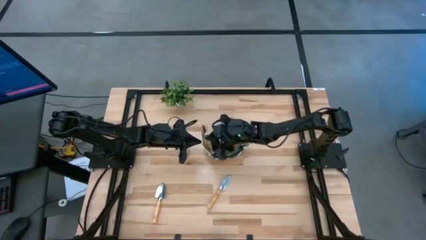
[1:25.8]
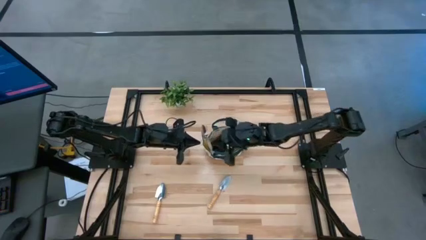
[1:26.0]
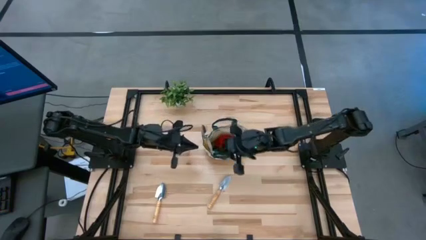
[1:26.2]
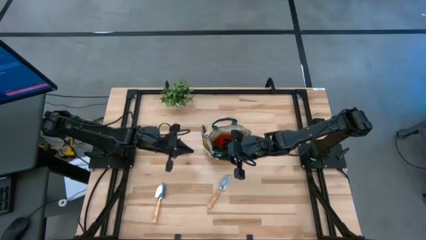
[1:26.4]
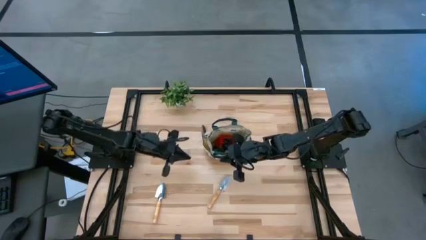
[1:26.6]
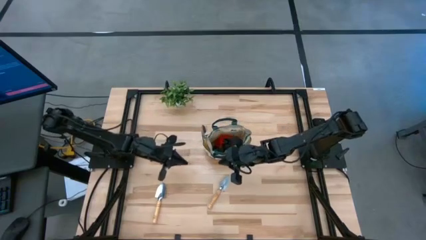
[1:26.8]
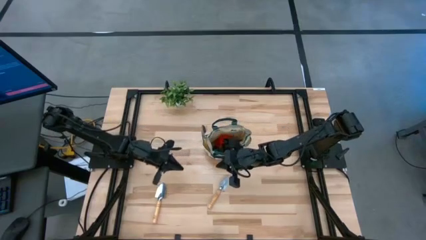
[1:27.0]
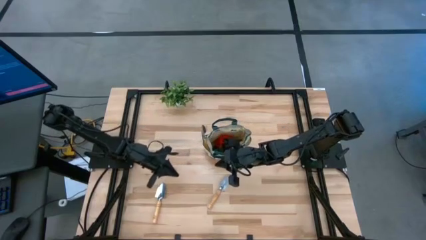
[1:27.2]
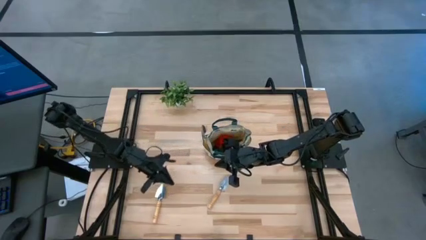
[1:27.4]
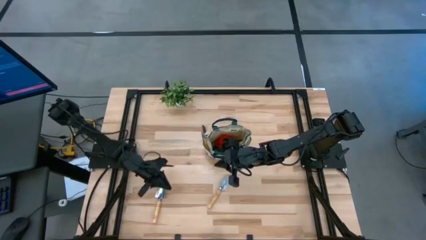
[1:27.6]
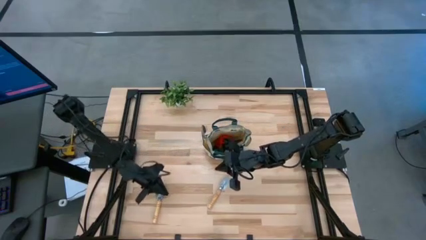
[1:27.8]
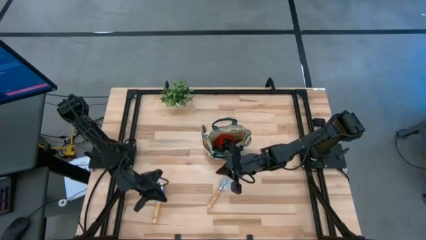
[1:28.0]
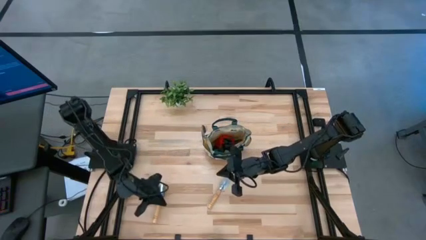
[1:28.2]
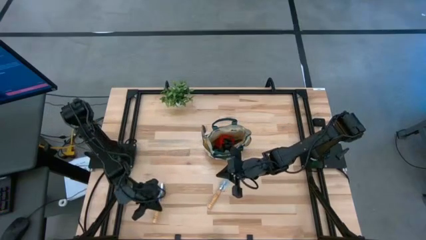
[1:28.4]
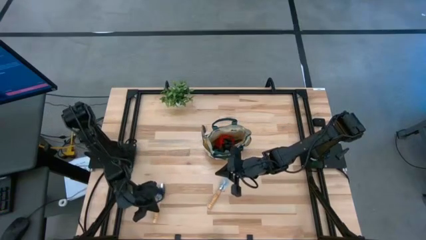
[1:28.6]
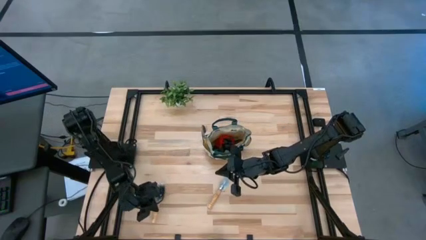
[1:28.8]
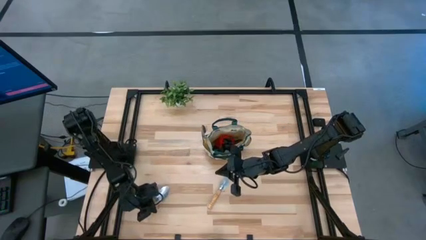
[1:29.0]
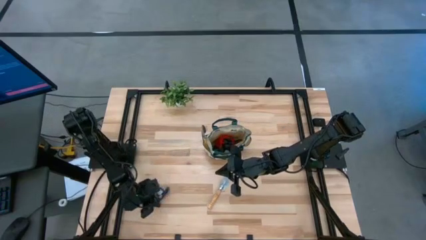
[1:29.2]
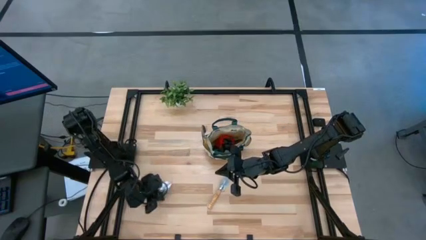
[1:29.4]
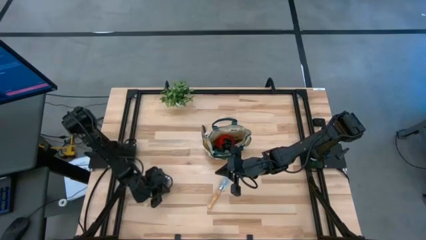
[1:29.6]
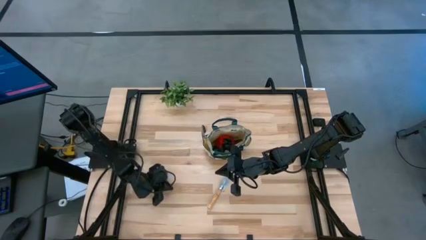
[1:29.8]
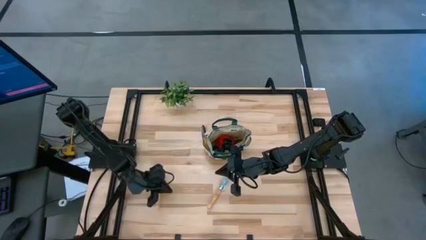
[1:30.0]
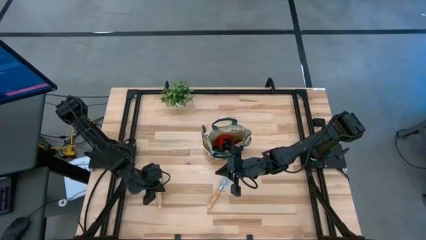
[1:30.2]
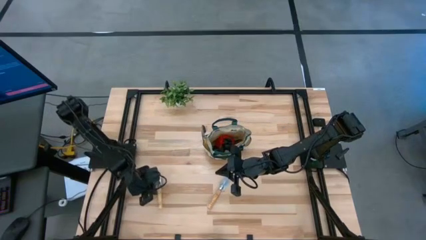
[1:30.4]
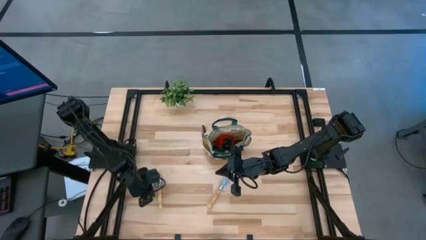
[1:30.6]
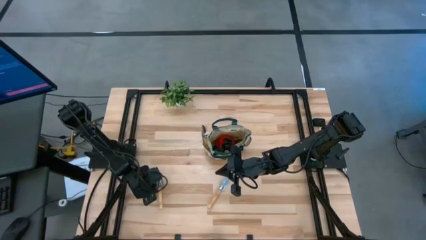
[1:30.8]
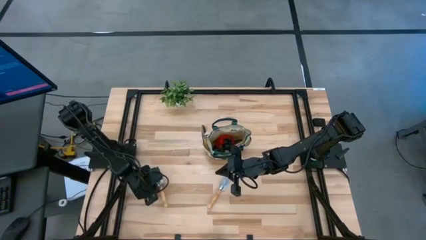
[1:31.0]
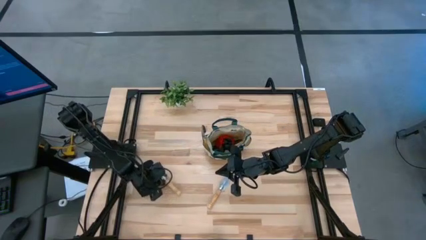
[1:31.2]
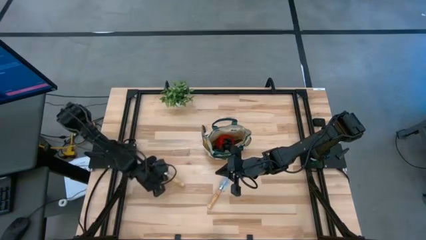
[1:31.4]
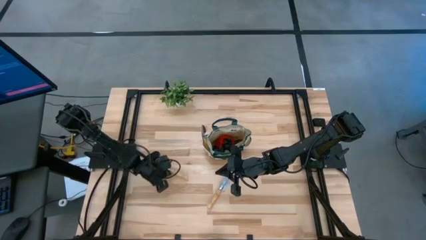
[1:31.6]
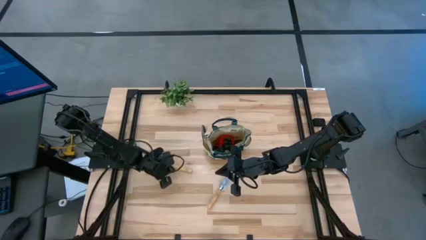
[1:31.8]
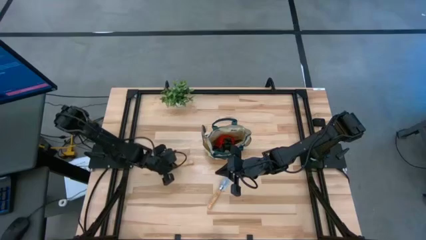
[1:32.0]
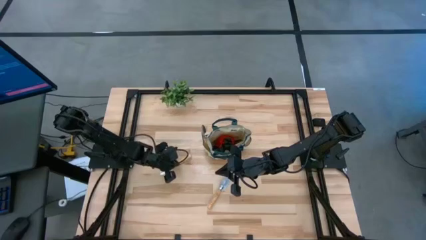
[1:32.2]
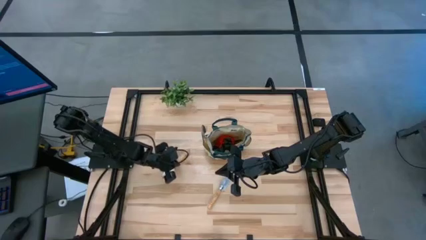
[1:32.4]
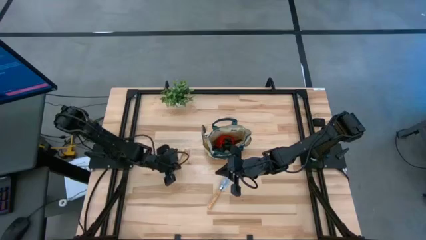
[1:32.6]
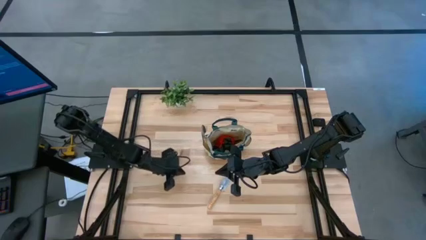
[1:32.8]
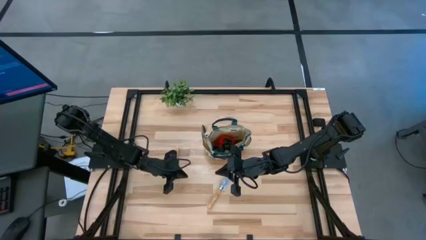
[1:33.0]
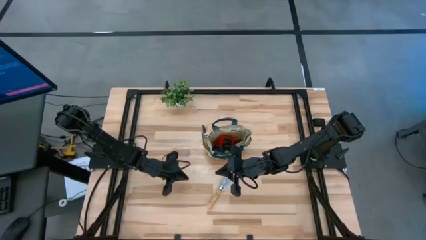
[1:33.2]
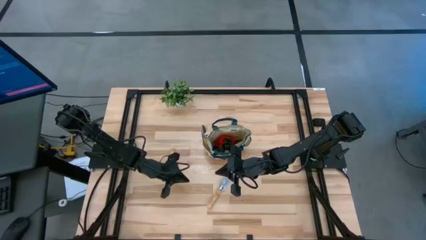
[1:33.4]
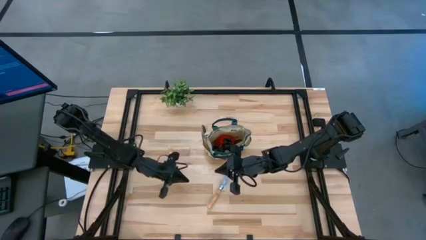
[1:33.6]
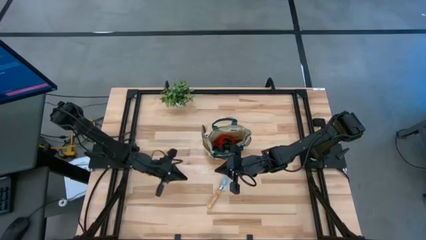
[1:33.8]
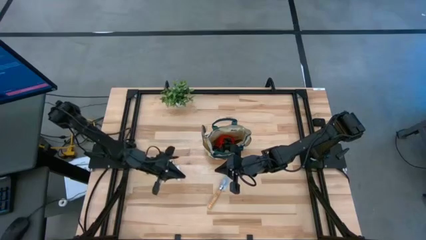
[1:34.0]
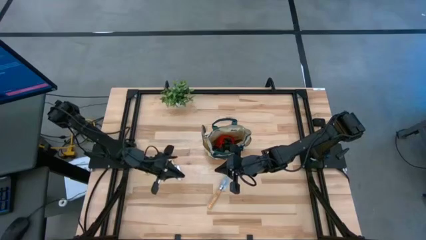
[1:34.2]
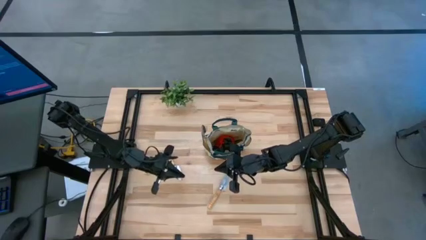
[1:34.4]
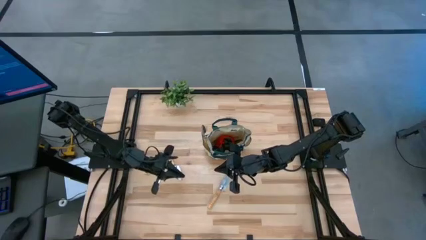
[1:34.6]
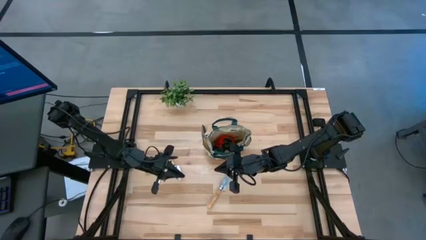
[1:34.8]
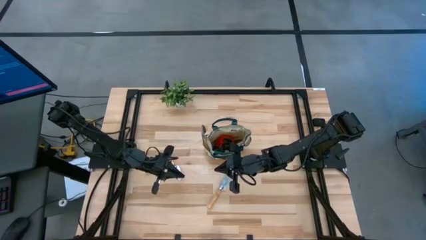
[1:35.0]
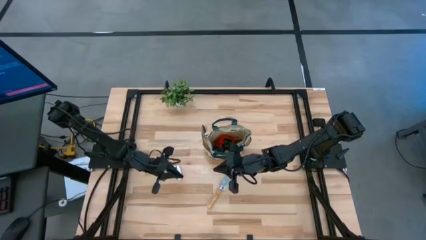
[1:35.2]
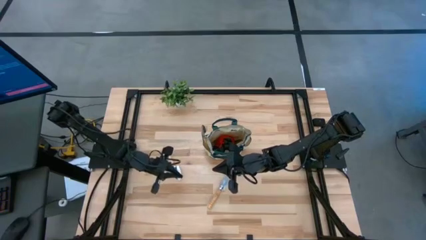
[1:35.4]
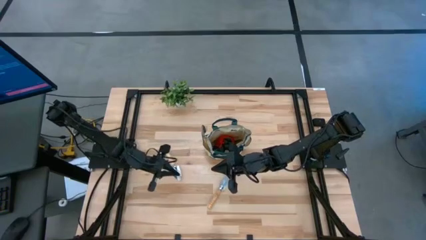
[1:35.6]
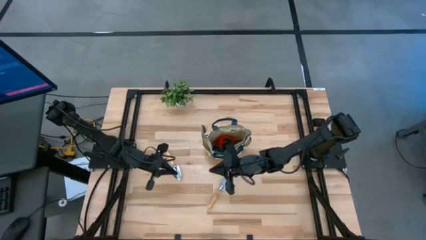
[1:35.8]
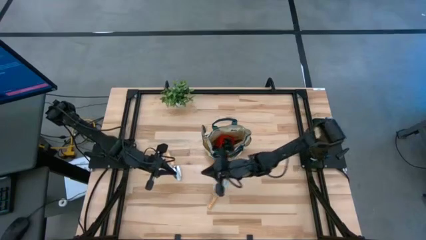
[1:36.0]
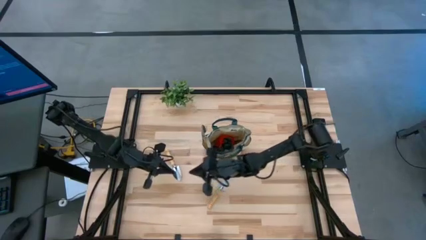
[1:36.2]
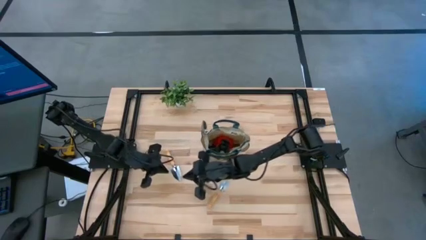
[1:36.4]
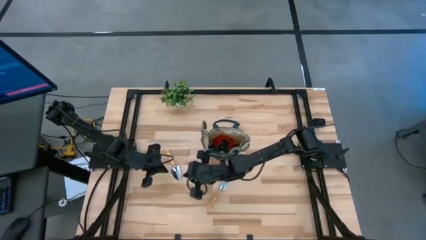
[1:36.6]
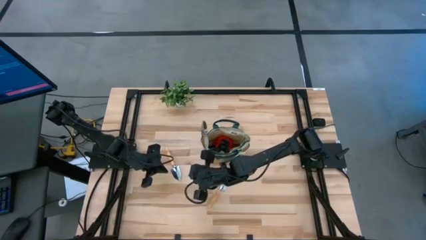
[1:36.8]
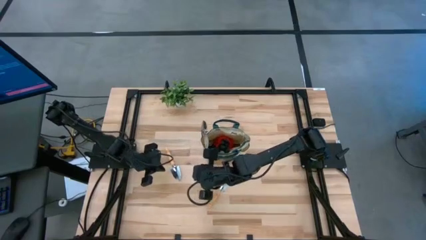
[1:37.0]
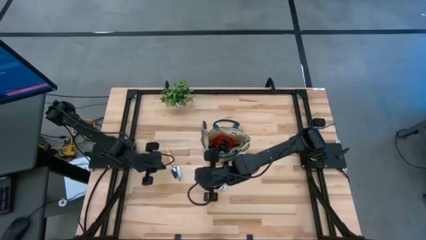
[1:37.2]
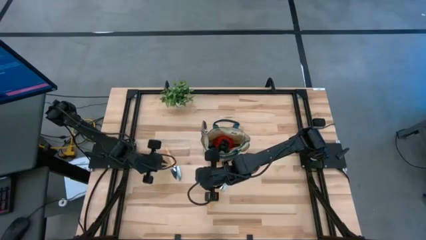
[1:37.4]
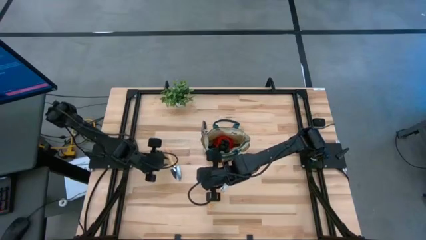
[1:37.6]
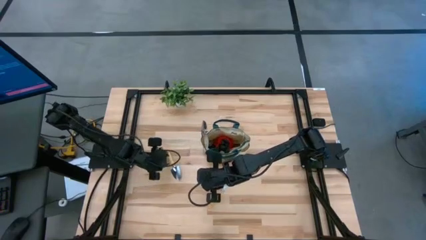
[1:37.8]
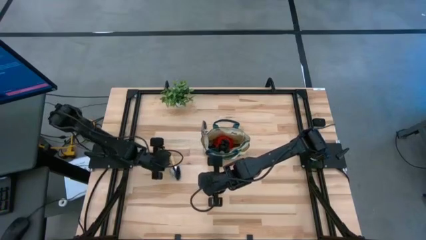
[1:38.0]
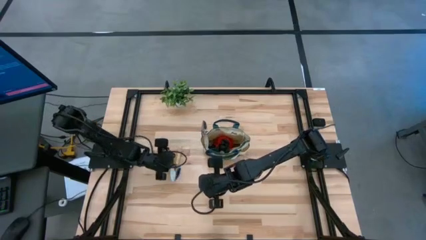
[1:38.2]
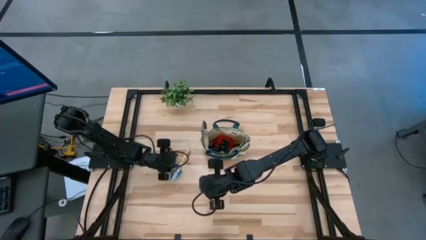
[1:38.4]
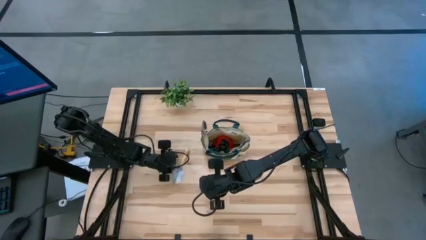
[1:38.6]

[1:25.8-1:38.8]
Task: Pick & Place Garden tools in Gardening bag
Put the trowel into the gardening bag

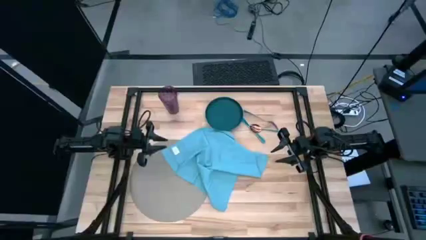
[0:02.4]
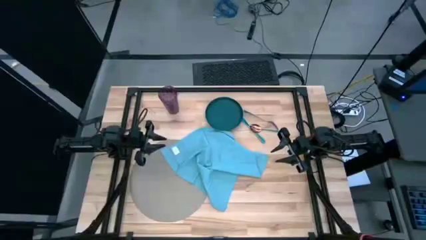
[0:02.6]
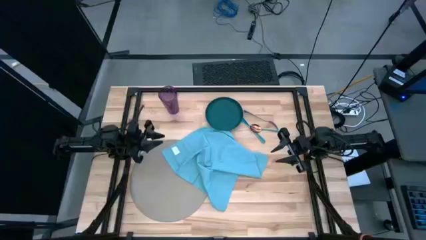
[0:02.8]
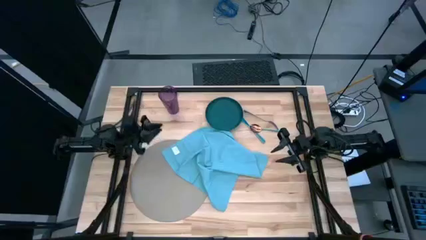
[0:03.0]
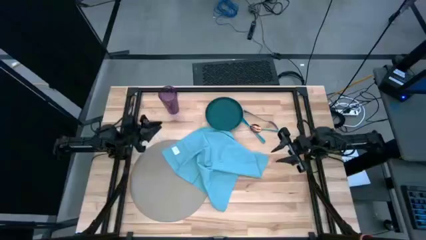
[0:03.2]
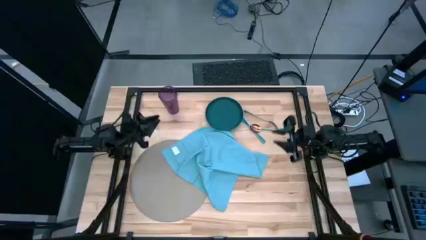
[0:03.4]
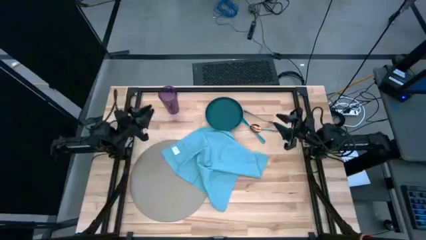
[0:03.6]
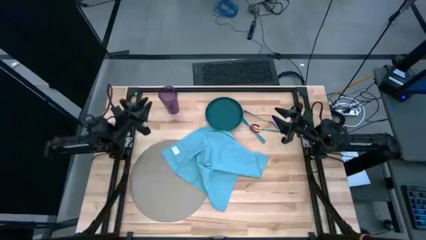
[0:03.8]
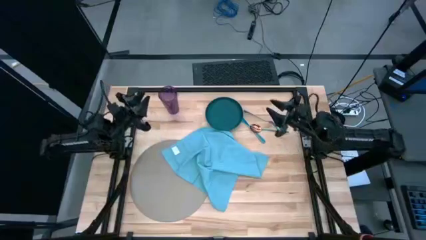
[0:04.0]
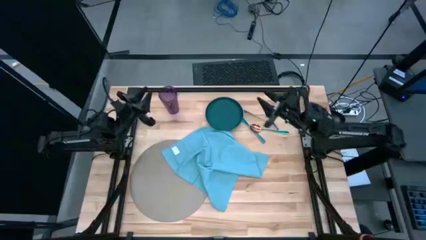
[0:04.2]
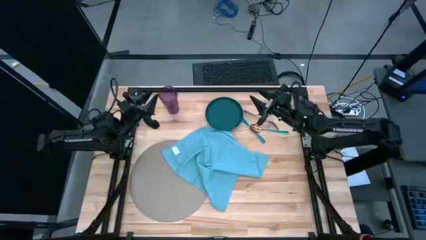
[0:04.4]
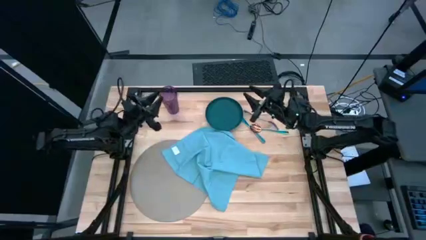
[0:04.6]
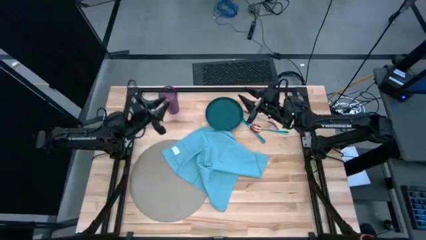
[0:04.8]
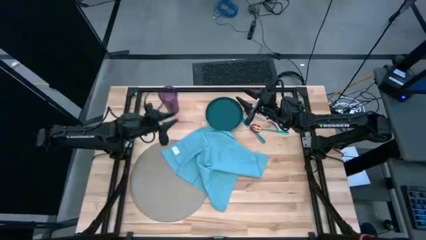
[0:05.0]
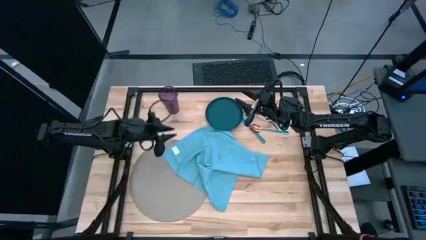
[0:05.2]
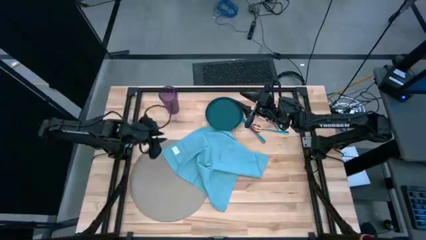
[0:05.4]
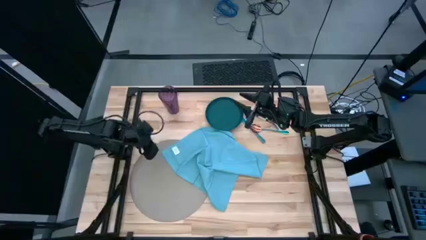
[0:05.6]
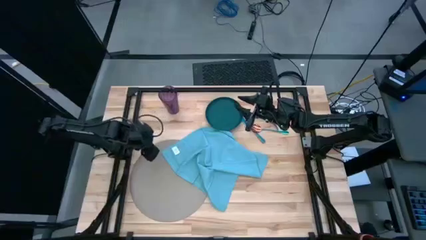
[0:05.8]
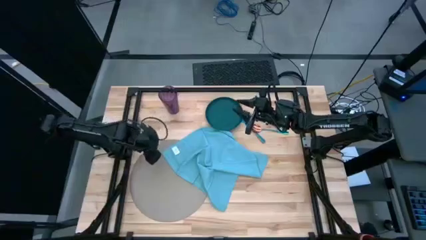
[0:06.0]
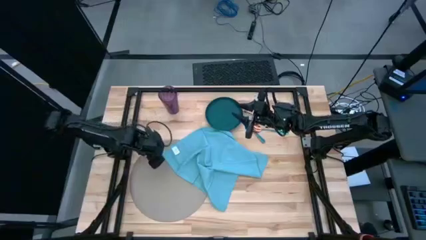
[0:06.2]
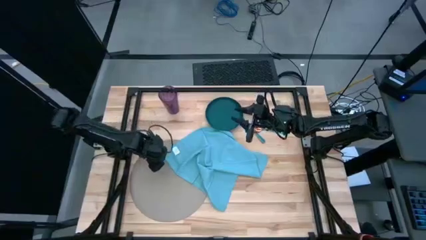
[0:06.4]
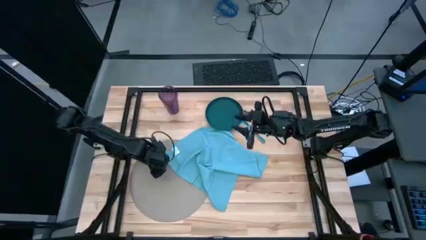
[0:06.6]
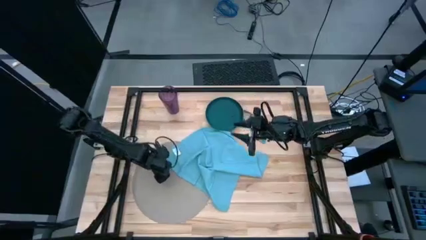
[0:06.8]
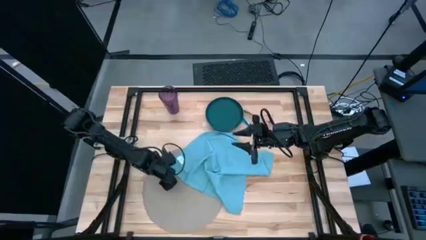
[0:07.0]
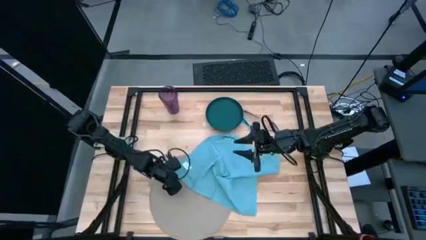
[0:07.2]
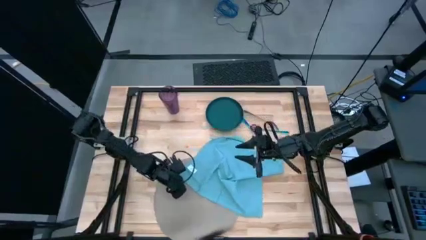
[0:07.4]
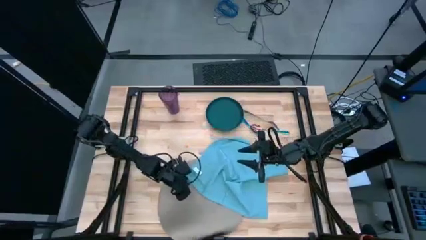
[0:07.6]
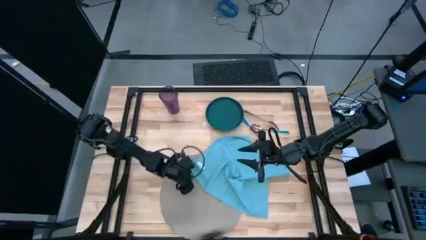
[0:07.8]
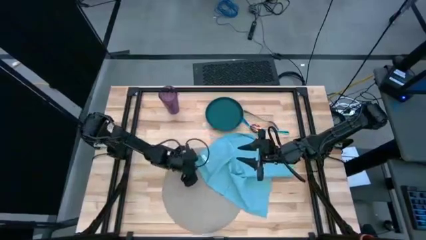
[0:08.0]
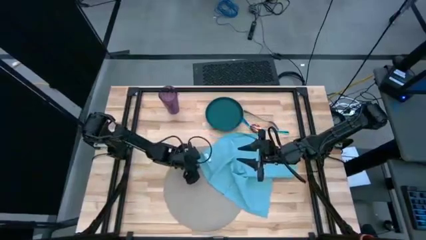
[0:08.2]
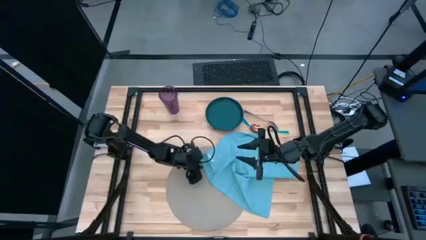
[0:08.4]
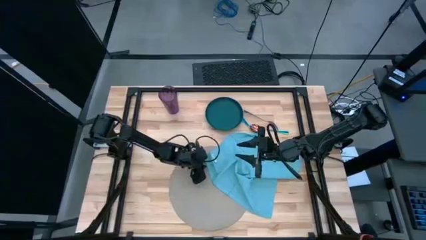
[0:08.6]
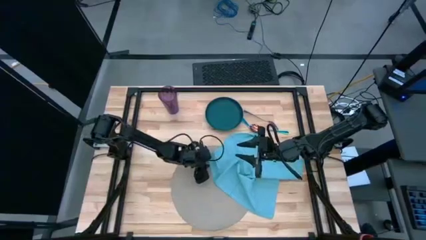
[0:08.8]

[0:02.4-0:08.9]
Task: Set table place
Prepare the gray placemat
